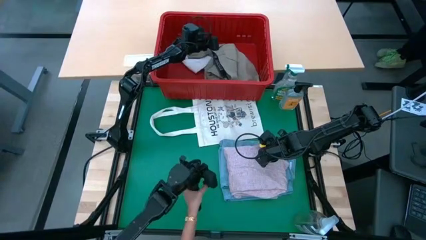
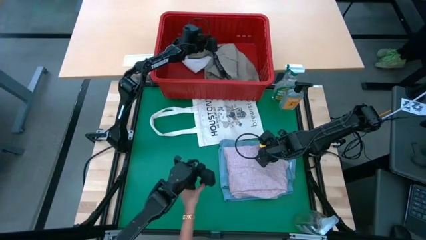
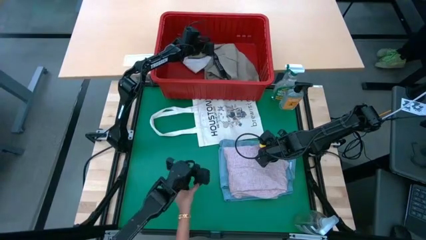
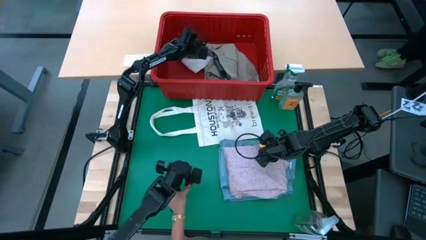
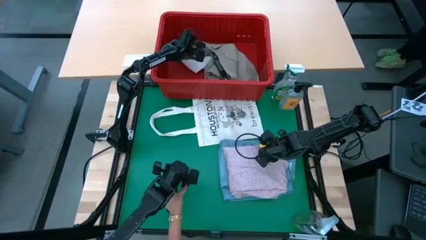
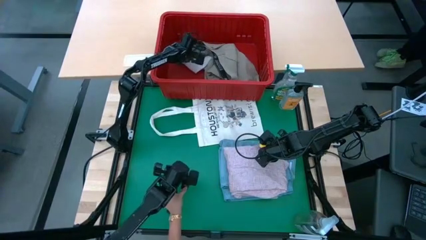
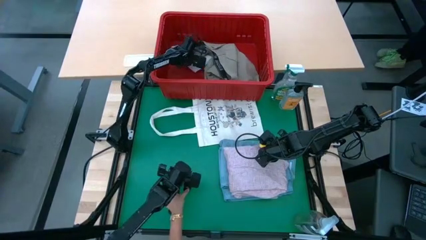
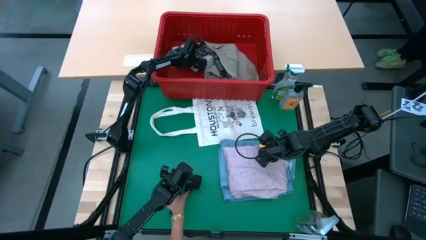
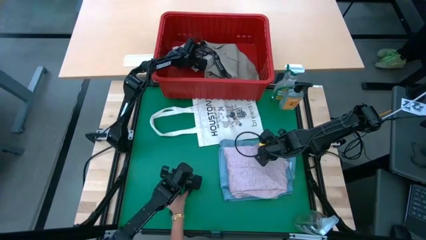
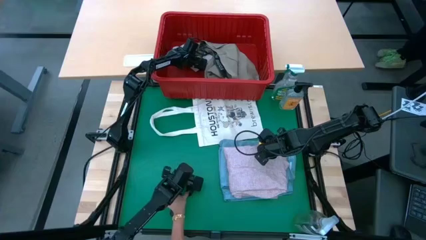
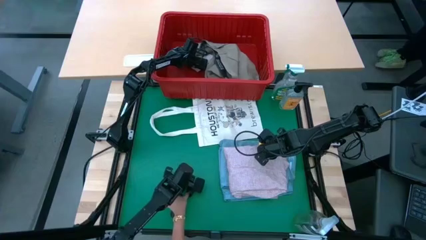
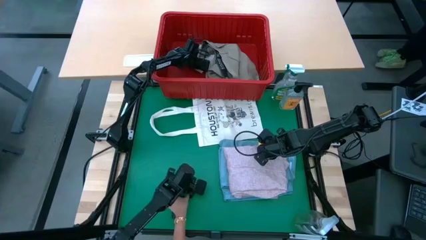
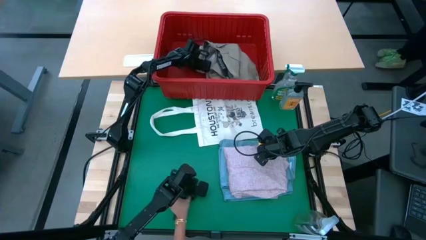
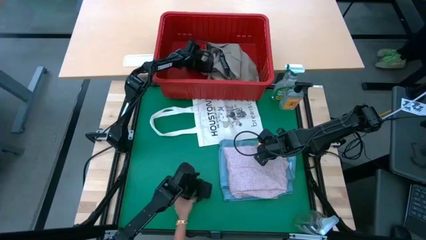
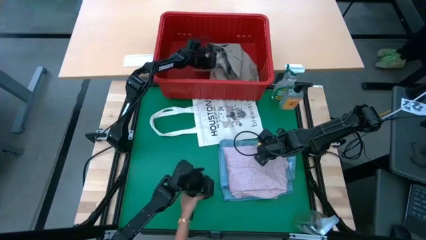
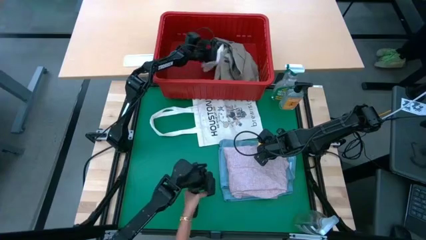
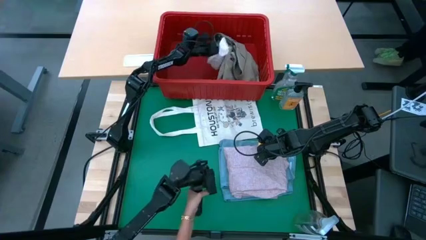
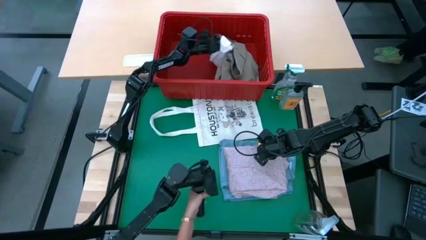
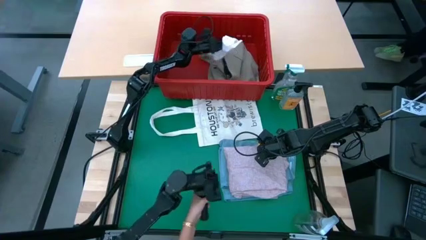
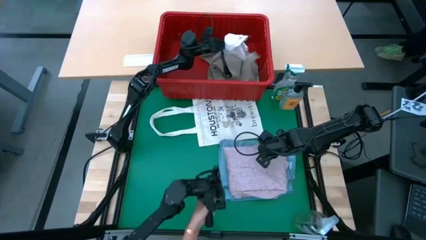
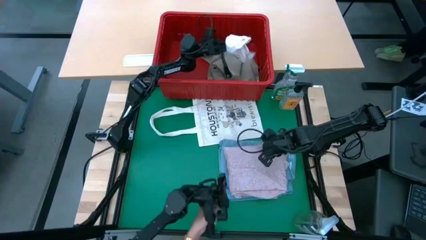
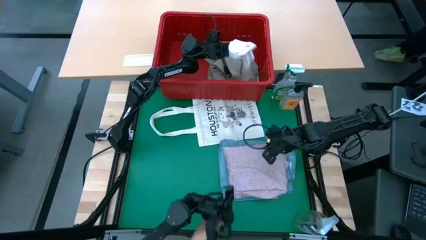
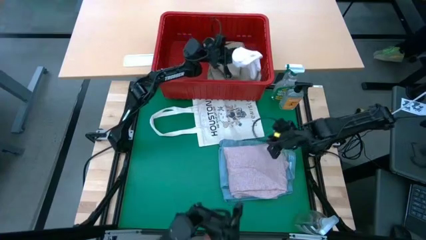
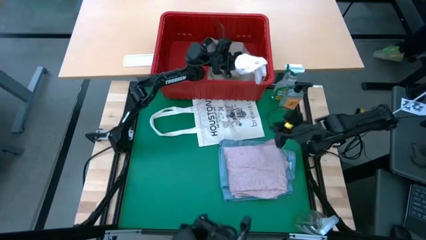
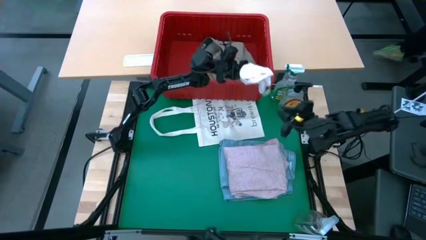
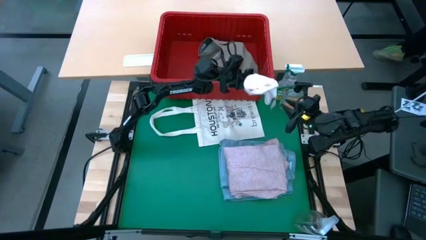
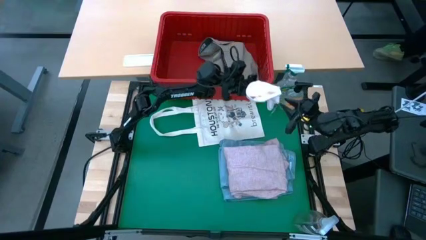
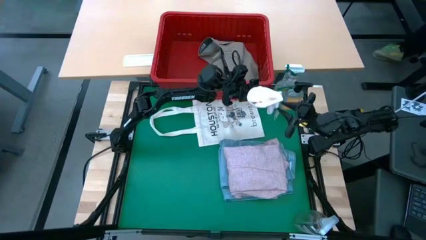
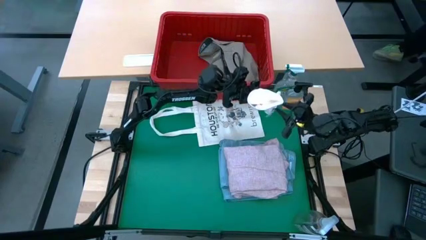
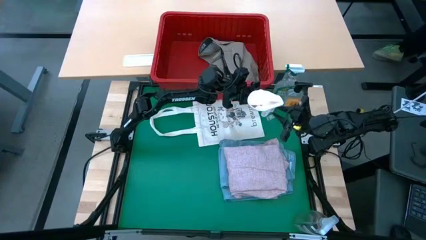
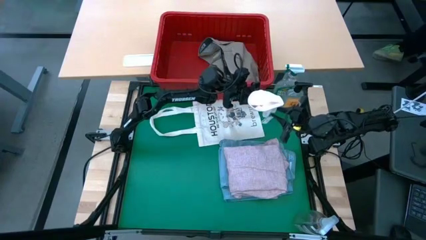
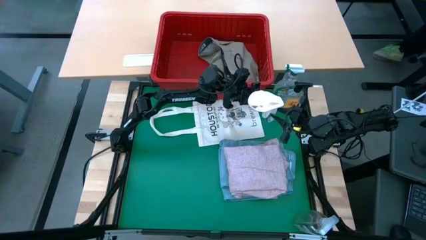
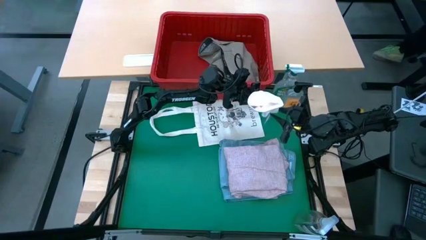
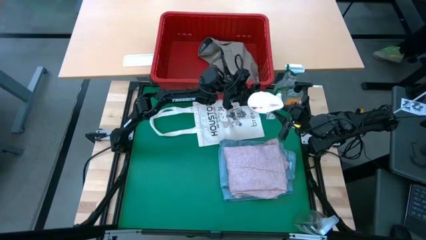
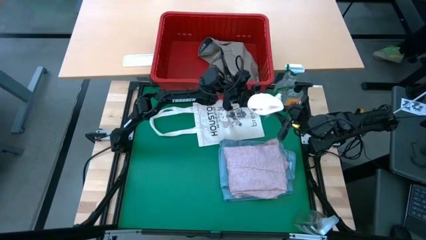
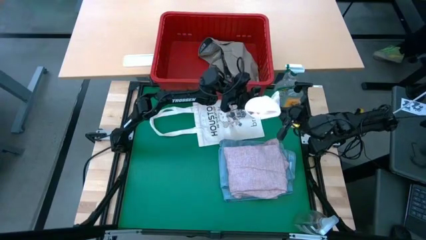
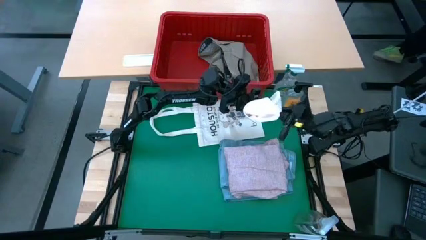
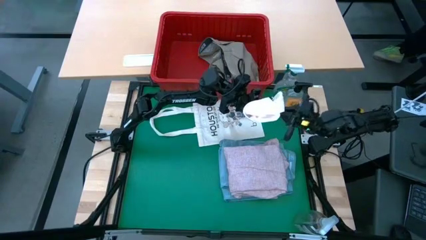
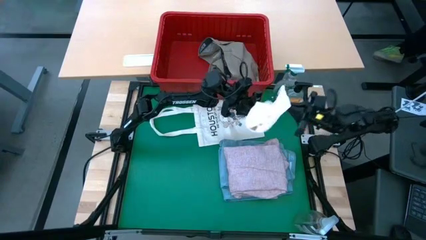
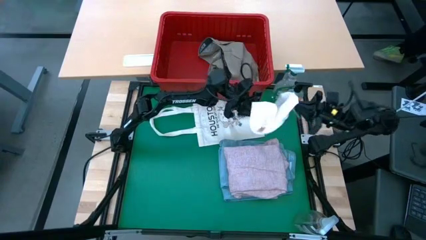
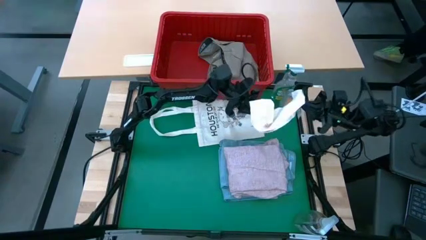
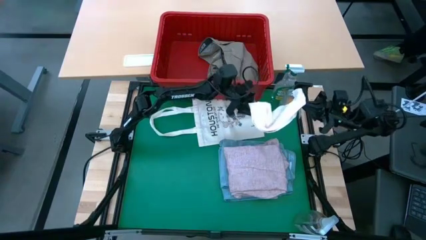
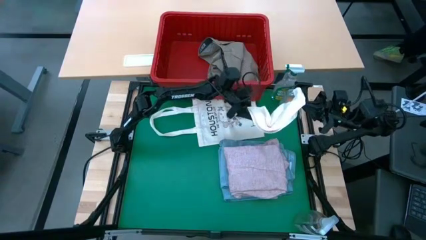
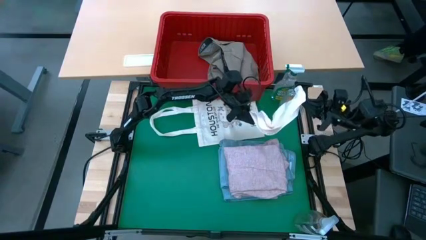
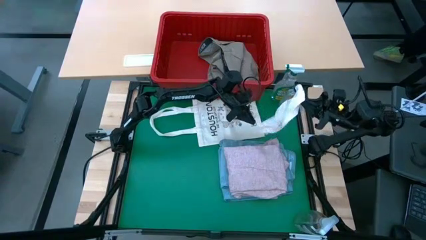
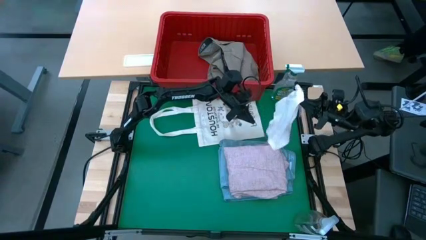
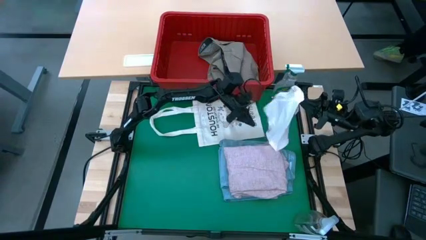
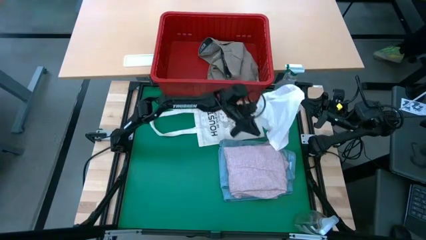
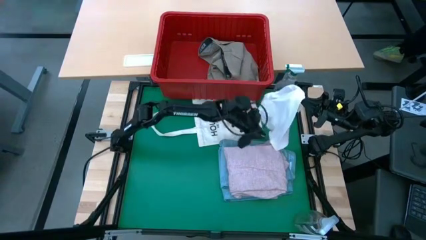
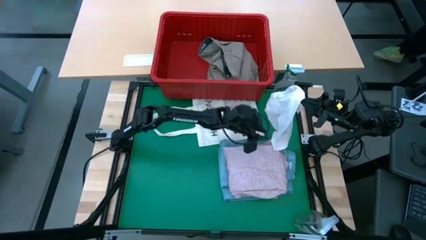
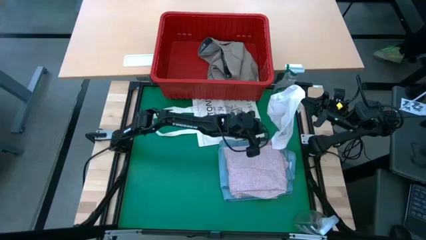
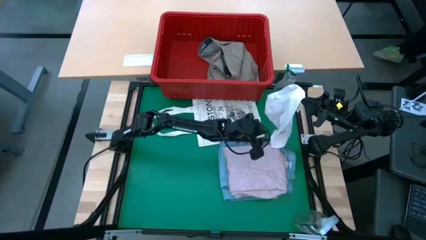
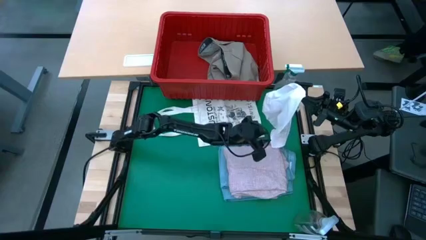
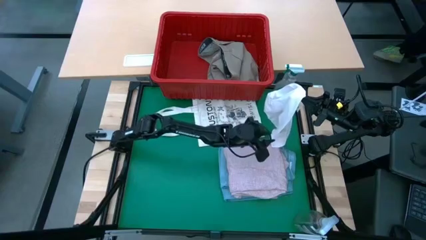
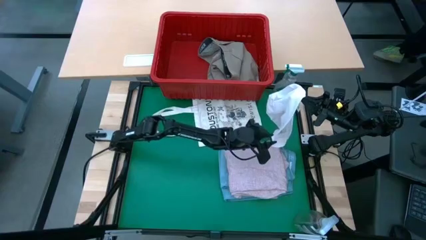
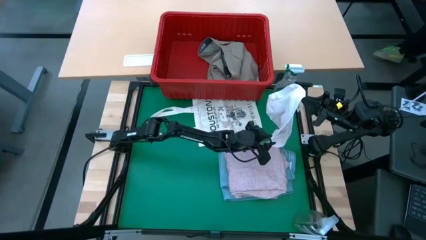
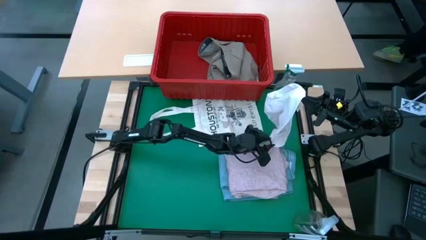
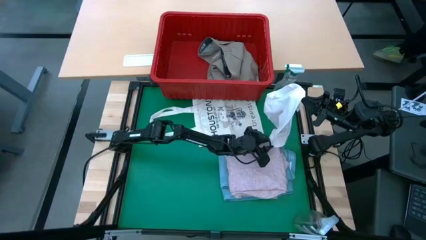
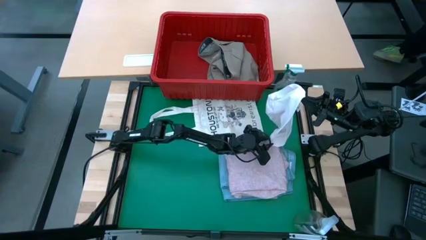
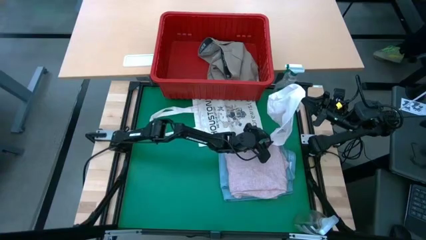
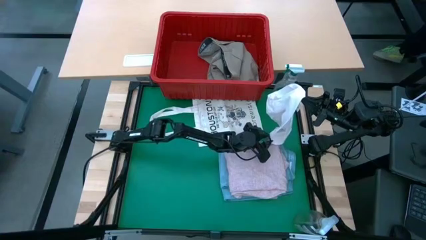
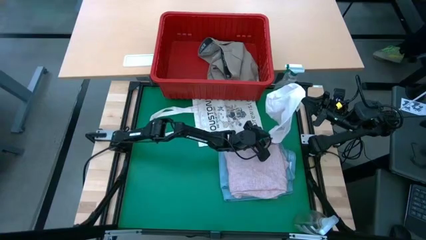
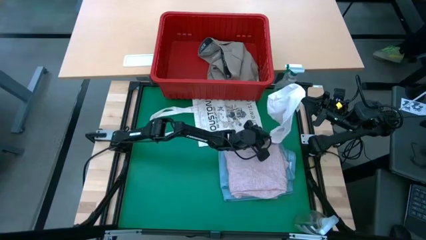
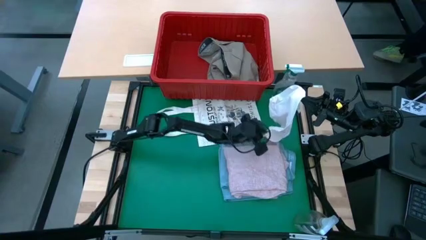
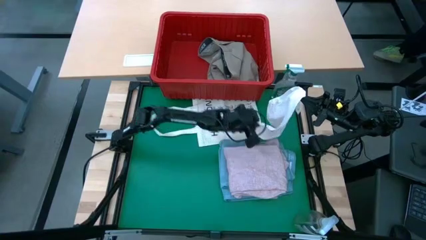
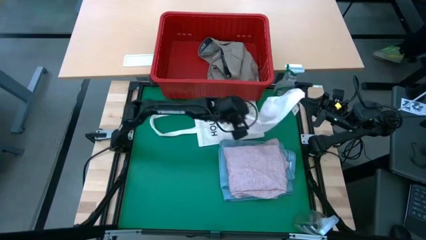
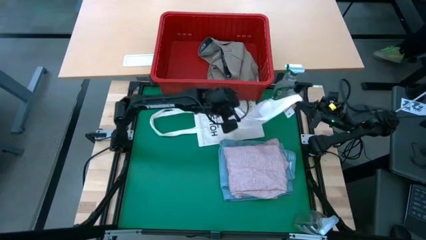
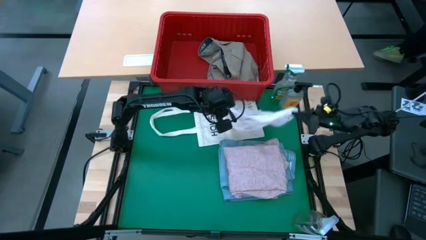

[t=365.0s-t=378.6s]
Task: Fold Laundry from Bin
Fold the white underwear from the red laundry basket
